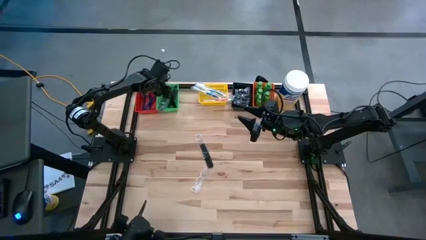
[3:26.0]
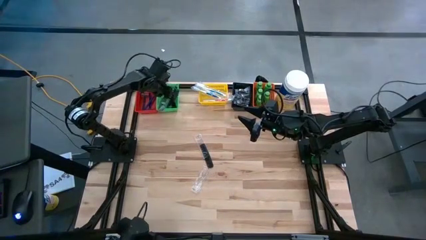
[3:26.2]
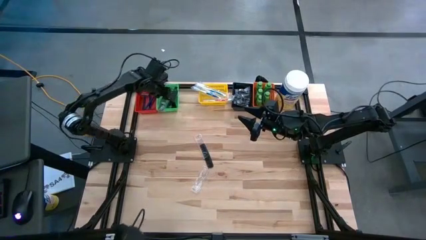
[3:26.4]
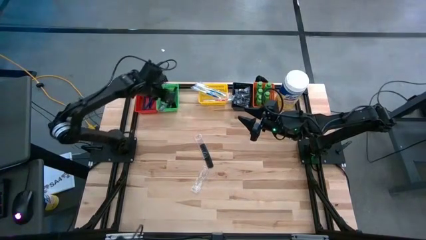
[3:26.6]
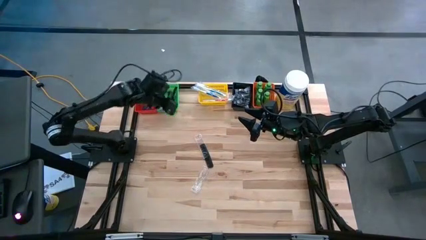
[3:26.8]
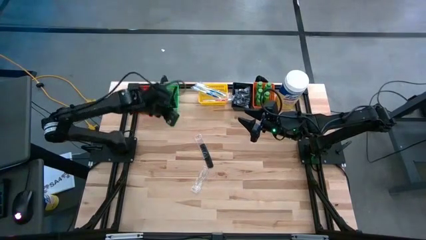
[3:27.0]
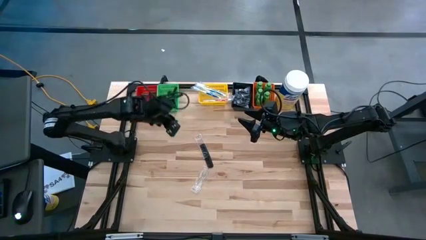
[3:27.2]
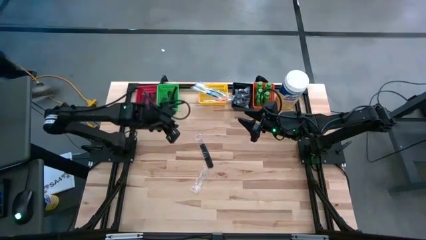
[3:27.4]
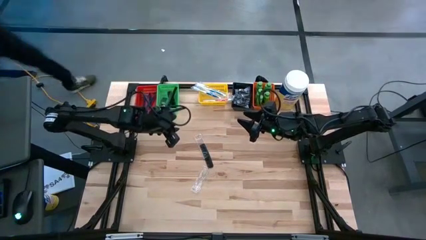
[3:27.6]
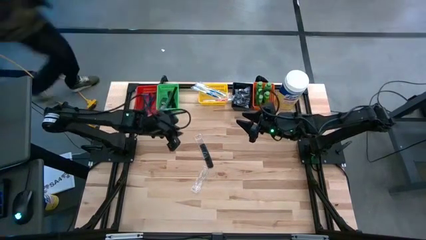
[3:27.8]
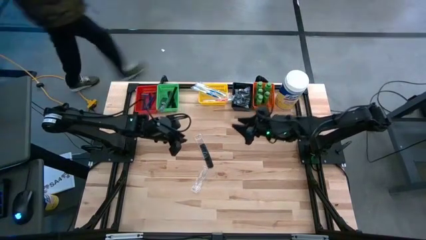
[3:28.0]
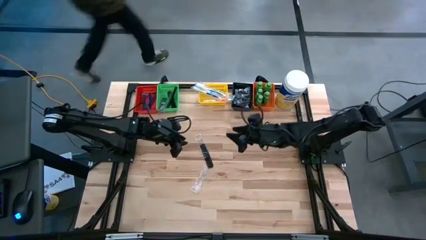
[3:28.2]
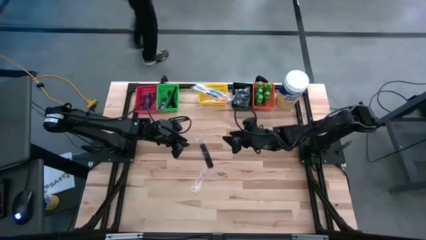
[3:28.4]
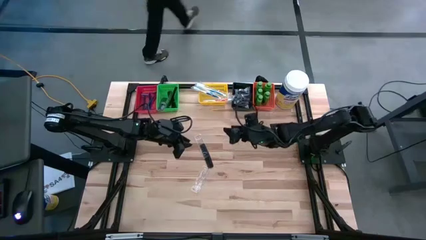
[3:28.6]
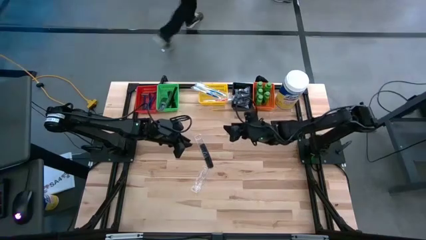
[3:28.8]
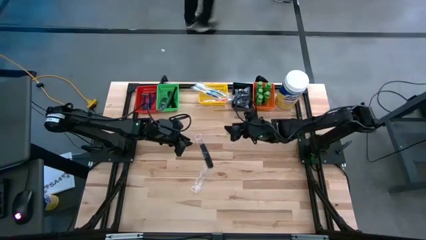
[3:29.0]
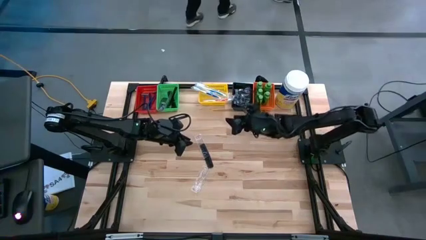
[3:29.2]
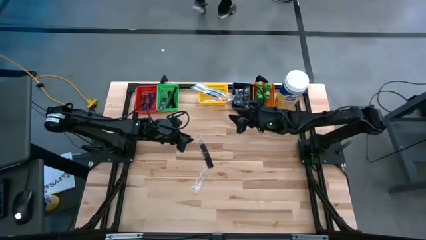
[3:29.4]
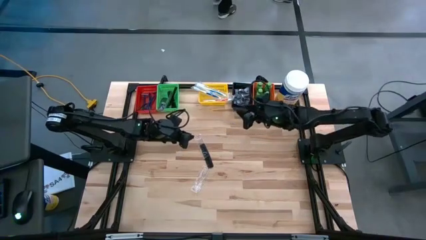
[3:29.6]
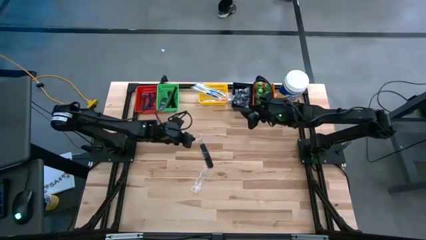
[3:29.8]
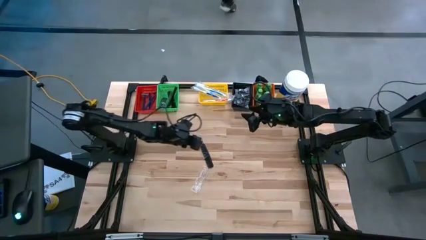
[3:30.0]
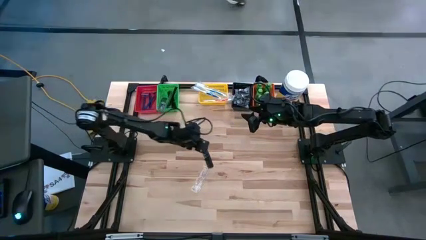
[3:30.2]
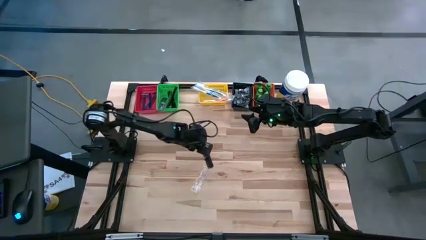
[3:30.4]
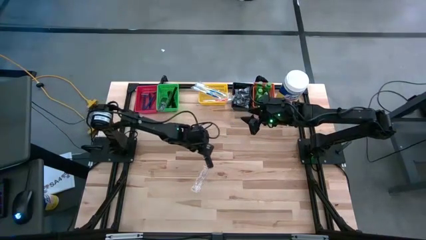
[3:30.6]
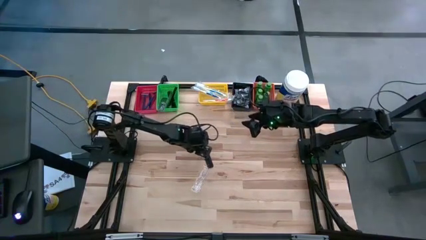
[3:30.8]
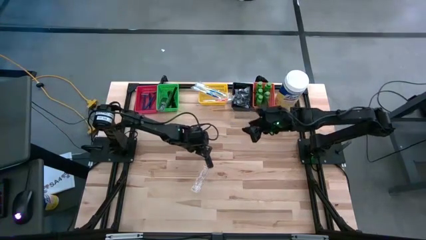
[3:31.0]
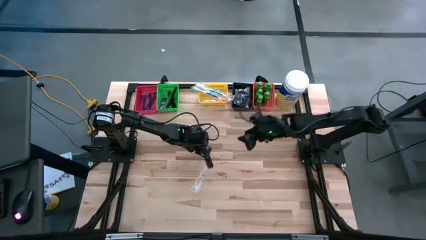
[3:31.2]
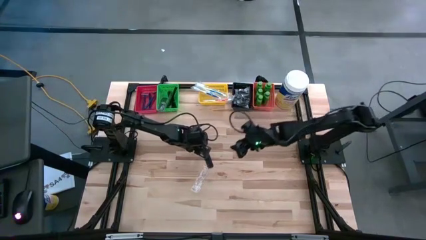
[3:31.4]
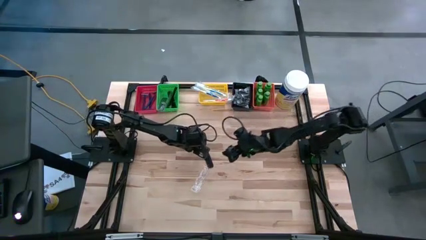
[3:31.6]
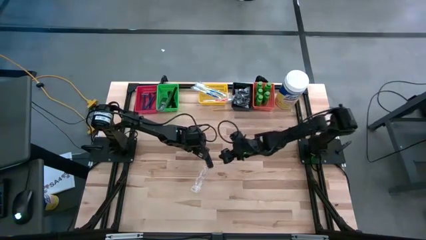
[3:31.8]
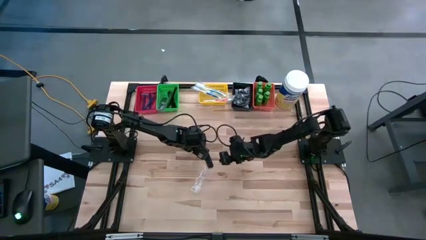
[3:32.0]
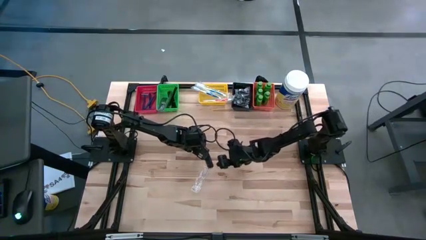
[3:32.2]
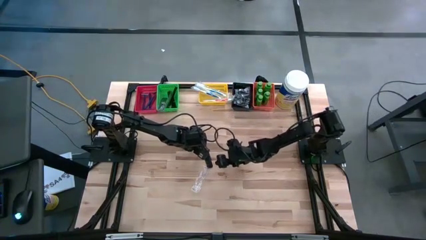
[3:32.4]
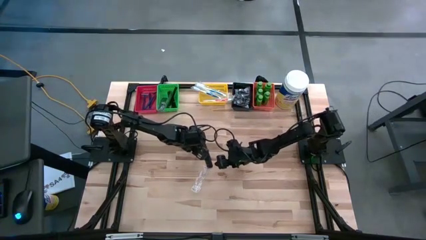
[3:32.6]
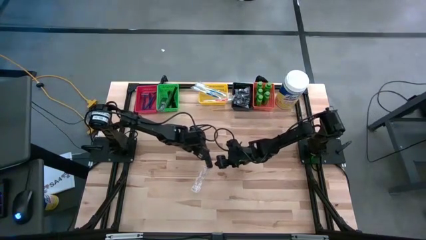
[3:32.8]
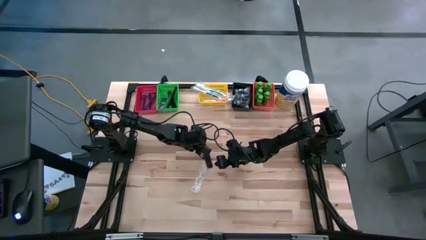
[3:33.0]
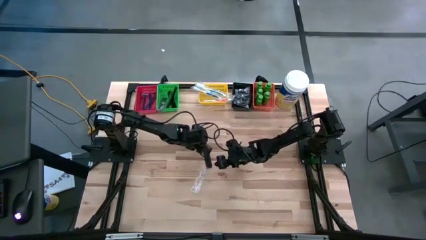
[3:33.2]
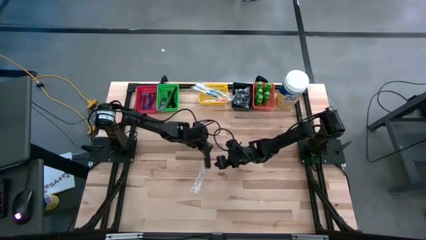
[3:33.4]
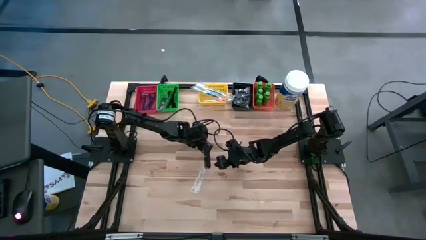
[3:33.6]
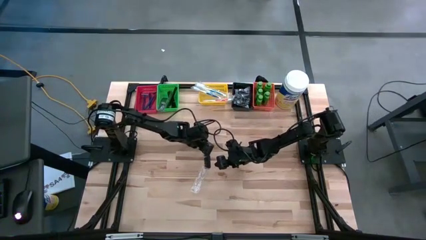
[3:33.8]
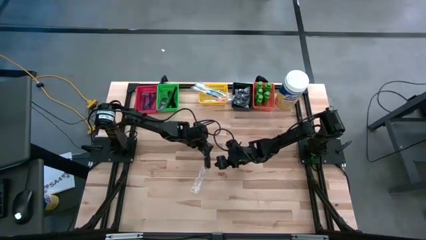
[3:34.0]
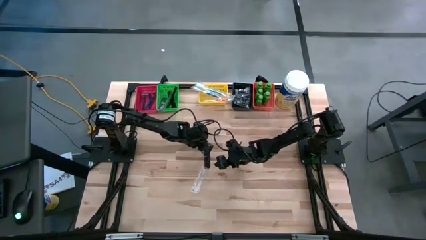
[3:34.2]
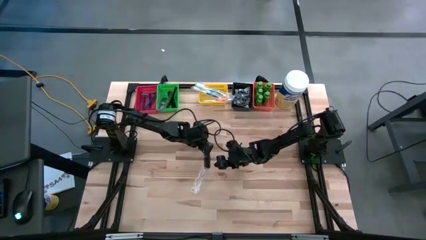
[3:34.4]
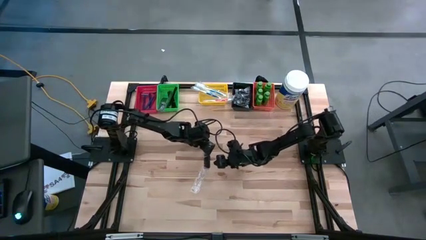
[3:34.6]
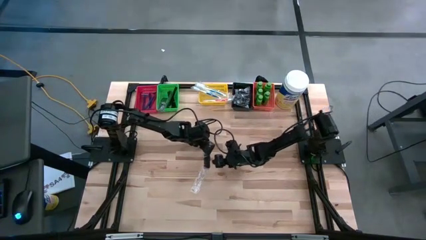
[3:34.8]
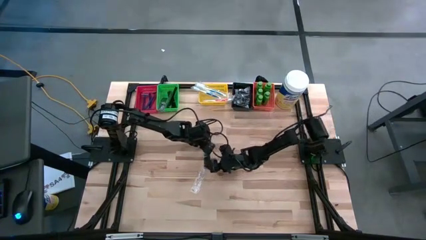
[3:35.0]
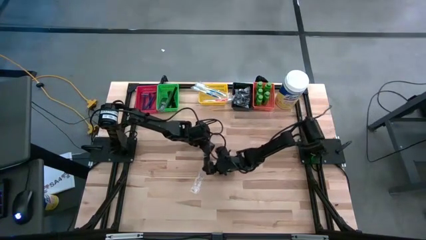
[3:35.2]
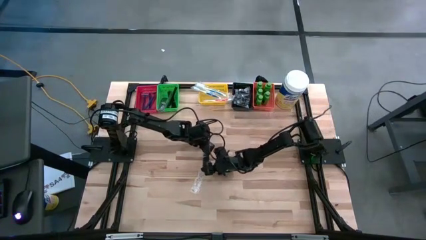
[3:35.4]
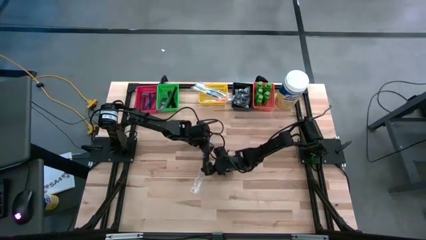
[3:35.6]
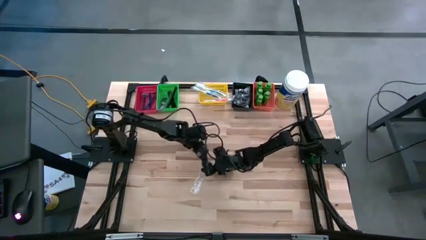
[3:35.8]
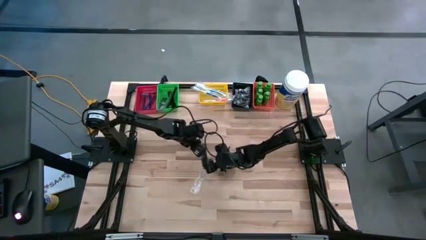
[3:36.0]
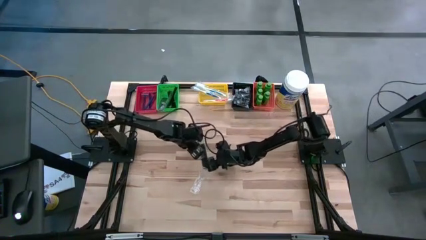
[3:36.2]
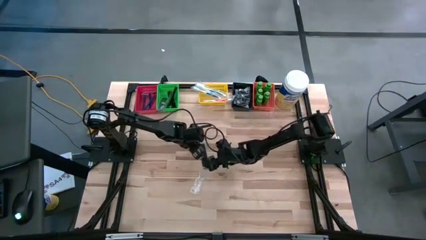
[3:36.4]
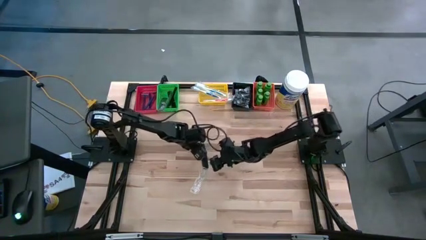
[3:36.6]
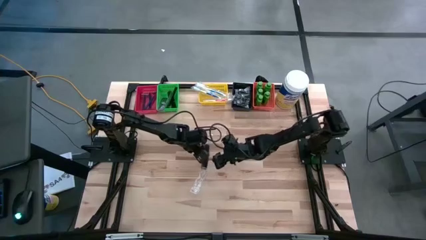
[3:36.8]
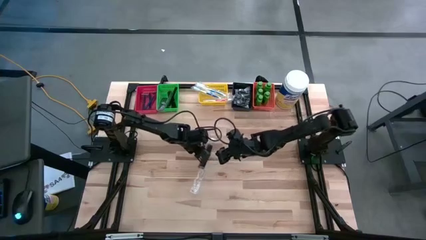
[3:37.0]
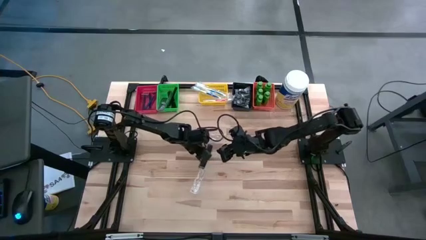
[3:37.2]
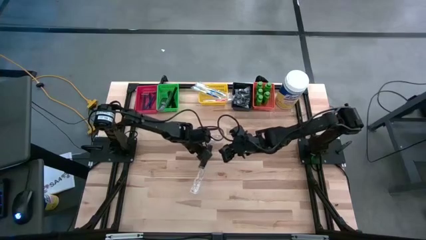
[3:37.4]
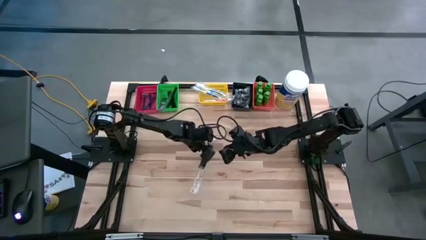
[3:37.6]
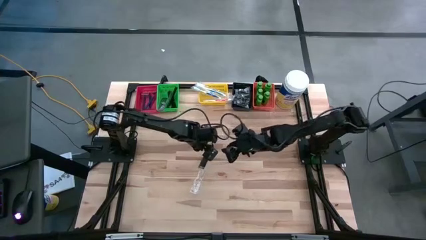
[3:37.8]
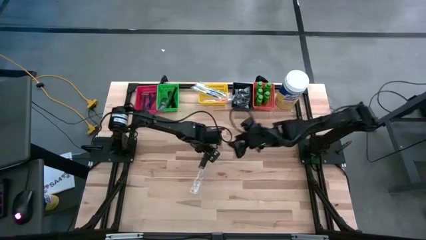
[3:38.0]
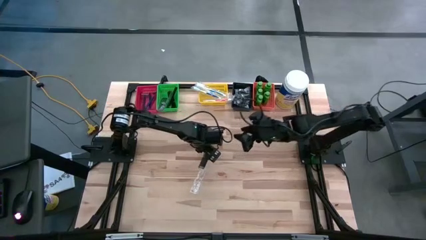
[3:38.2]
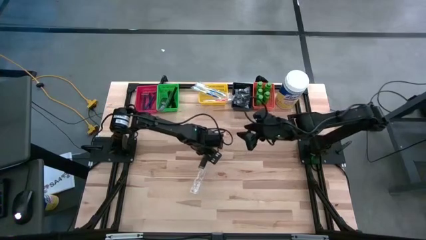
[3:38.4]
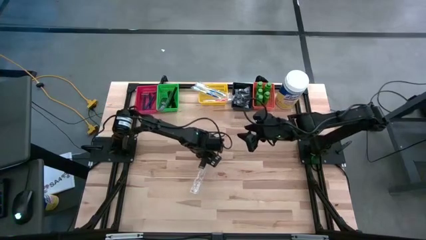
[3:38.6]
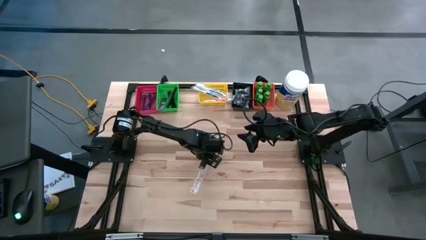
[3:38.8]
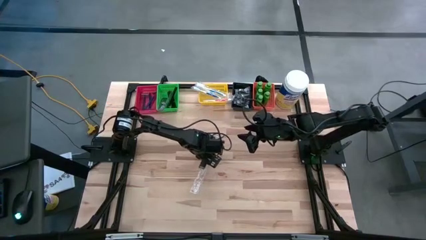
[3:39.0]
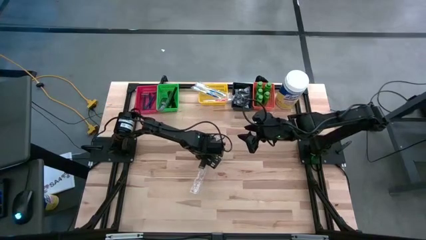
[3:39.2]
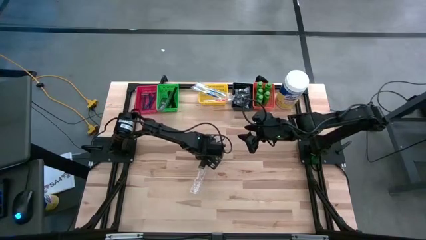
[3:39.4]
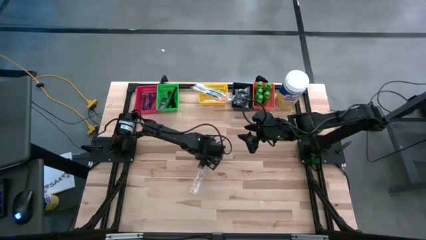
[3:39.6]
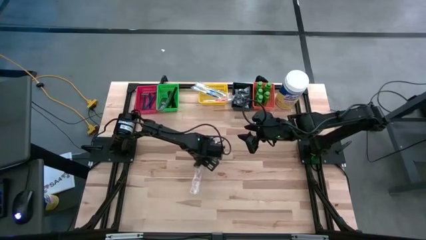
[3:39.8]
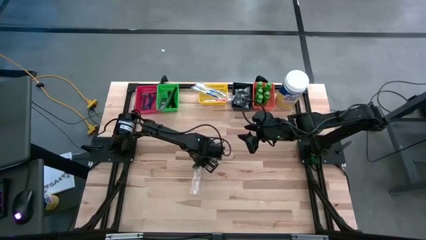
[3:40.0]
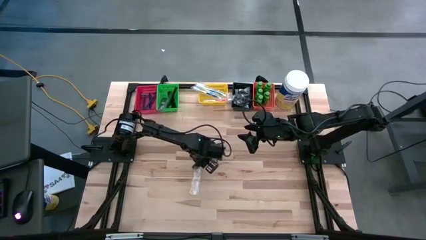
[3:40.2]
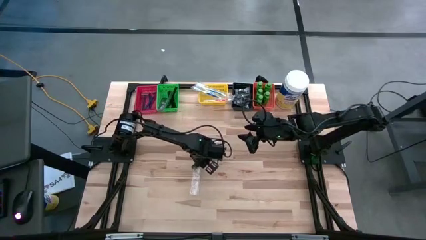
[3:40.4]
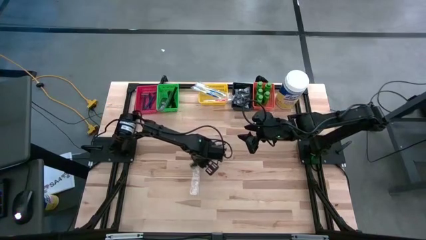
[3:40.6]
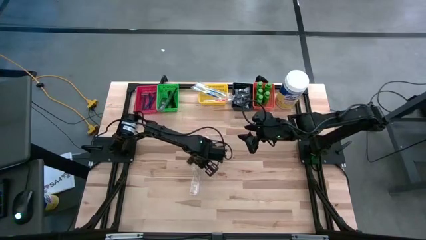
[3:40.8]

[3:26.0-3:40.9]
Task: Pick & Place Travel size toiletries
Put the black comb into the green bin

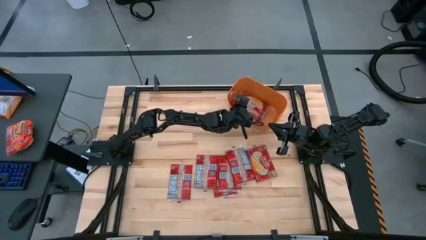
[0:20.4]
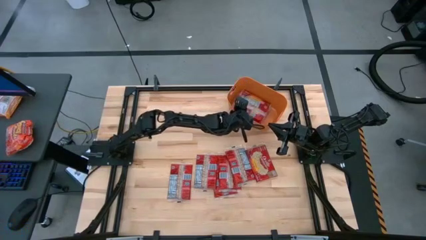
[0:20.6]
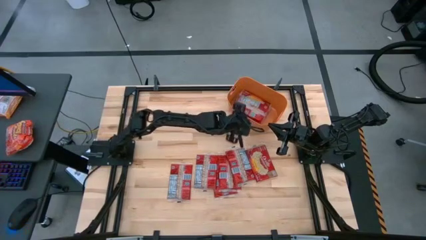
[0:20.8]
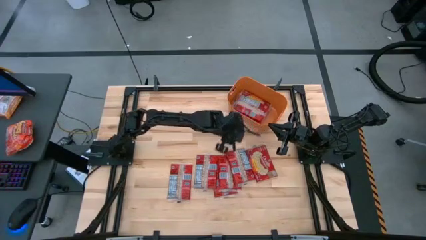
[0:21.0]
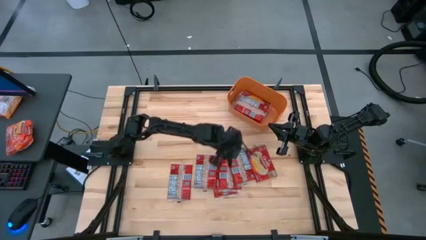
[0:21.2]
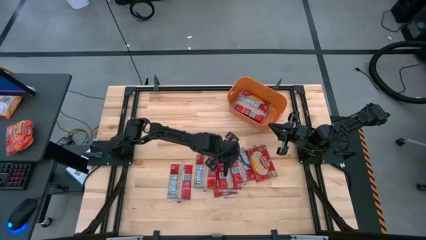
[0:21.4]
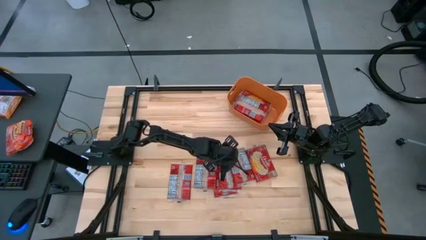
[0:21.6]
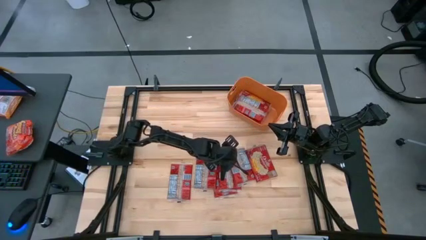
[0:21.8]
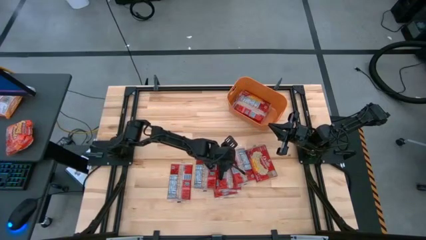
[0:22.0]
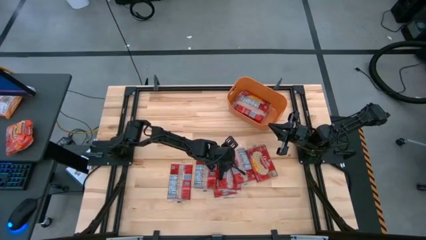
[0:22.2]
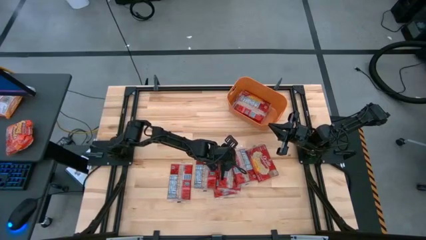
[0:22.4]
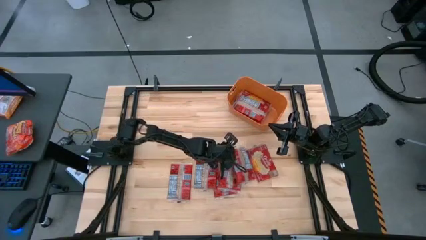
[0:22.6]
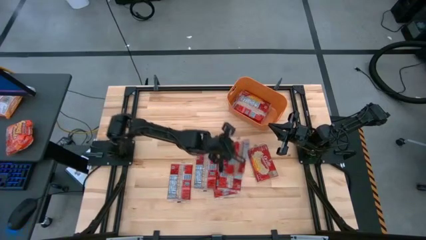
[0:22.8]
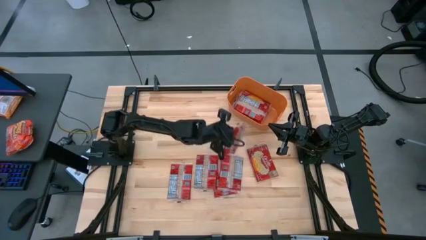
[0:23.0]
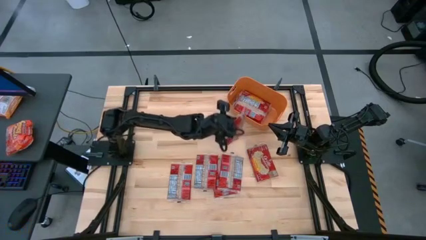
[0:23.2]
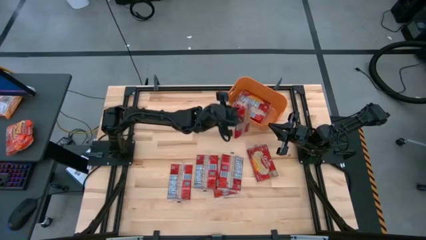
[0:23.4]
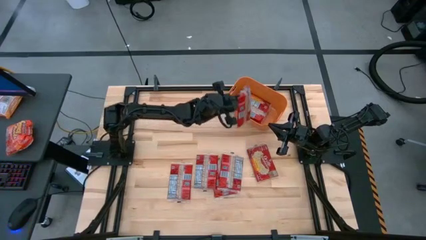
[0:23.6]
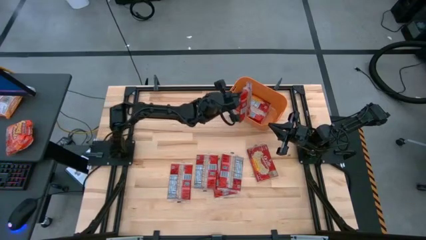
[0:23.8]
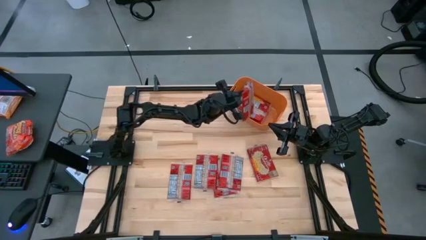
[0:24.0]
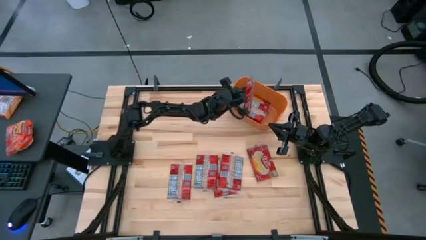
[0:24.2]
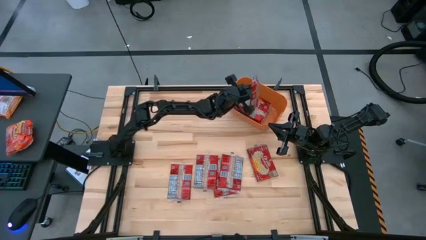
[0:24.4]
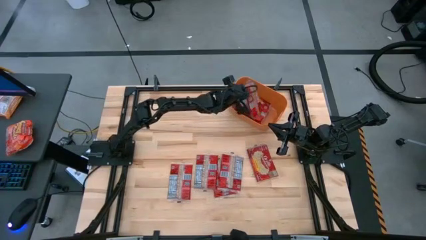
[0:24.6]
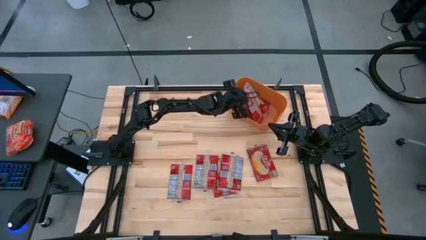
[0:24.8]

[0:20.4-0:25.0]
Task: Sort popcorn bags into baskets
Put the red popcorn bag into the orange bin
